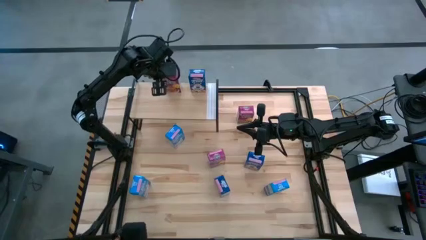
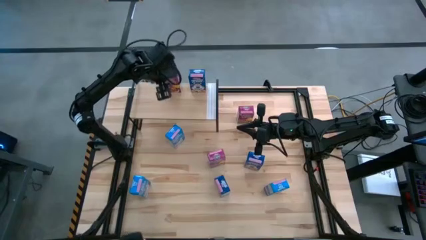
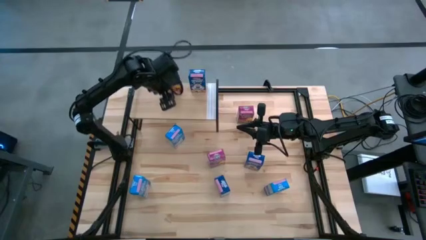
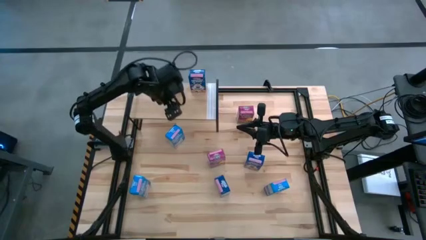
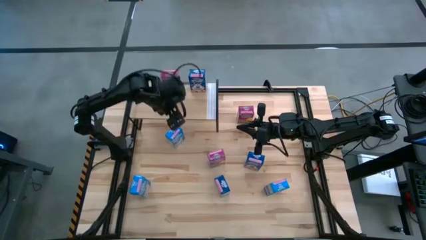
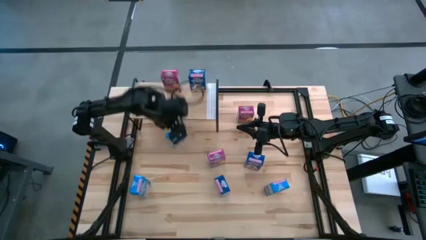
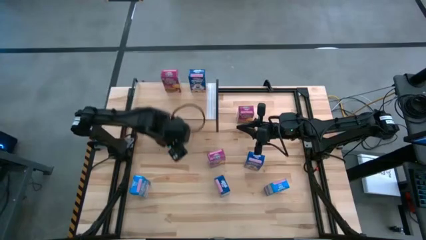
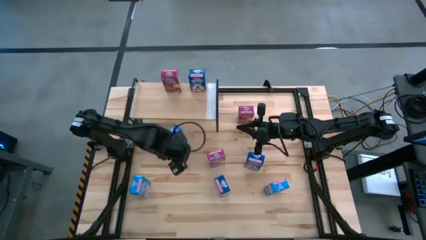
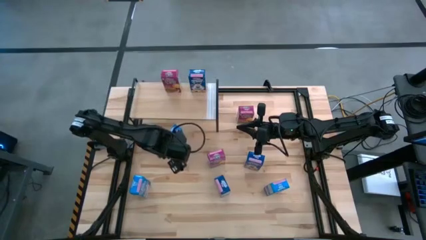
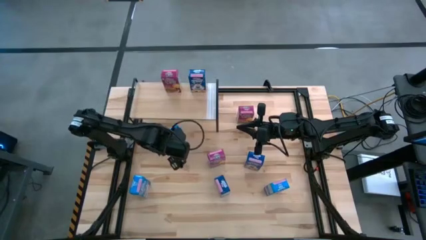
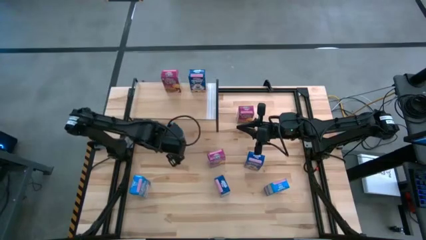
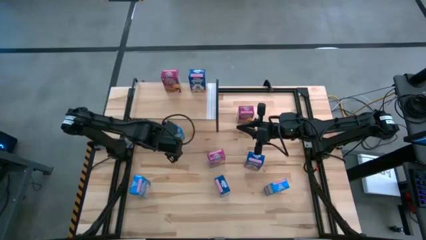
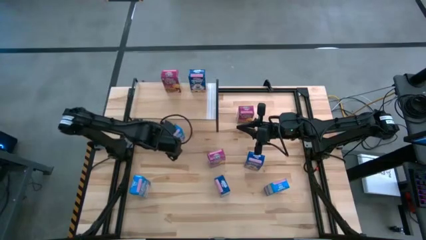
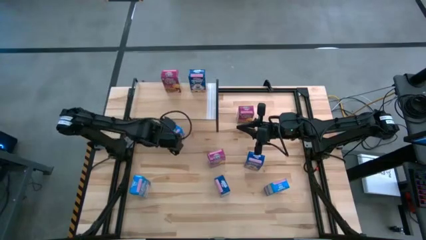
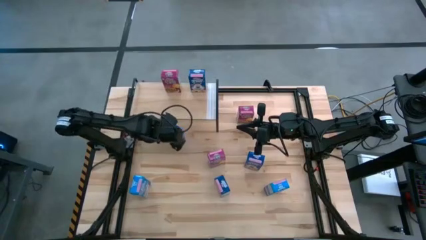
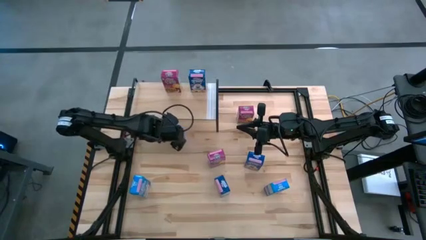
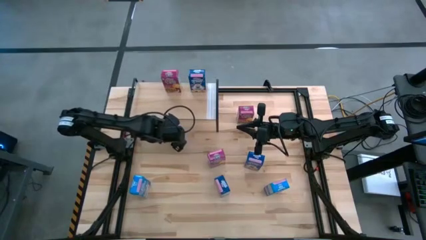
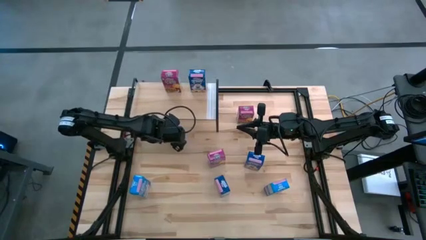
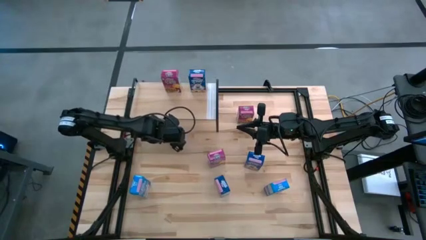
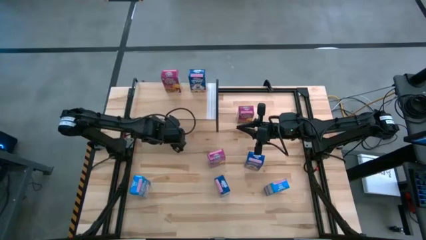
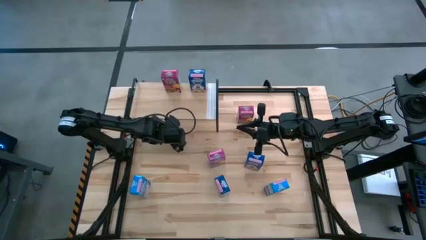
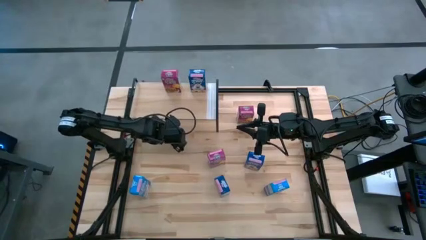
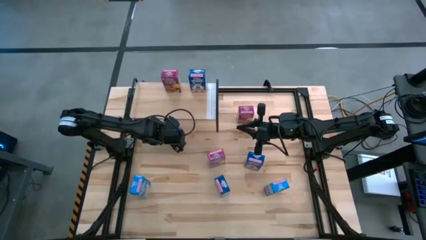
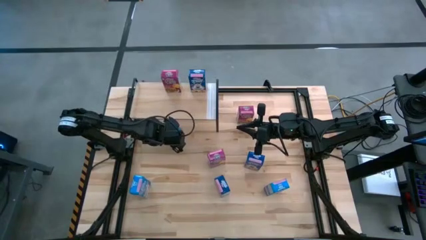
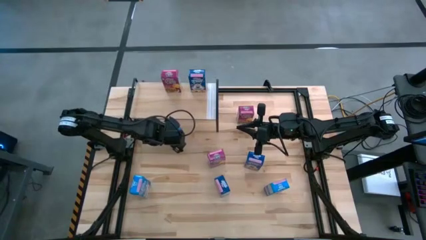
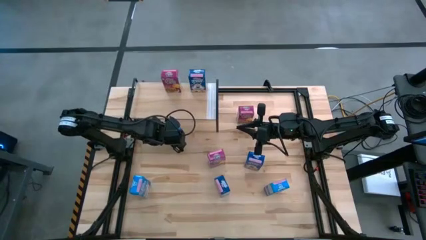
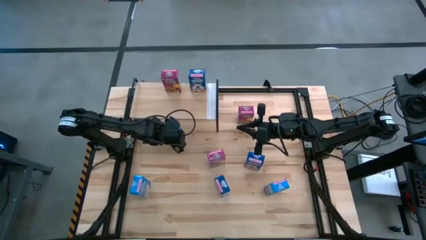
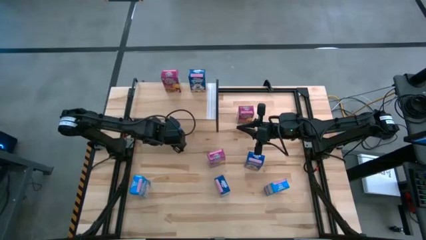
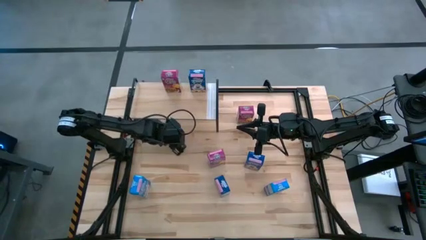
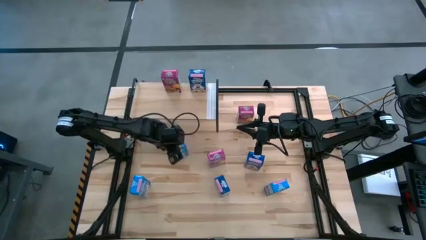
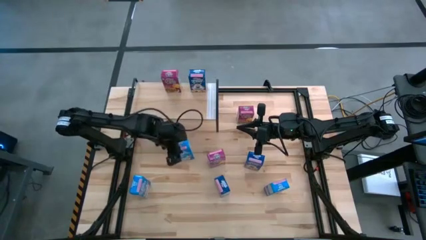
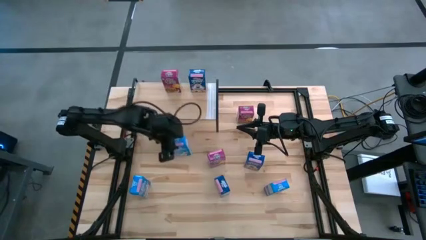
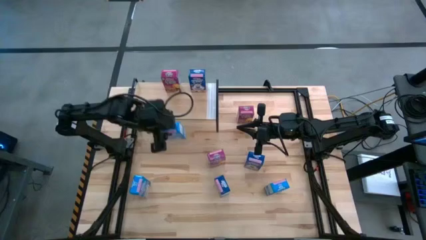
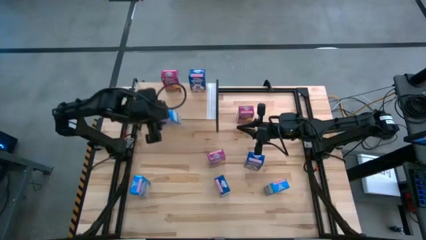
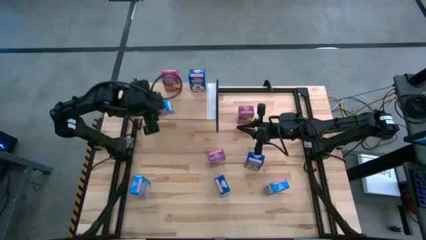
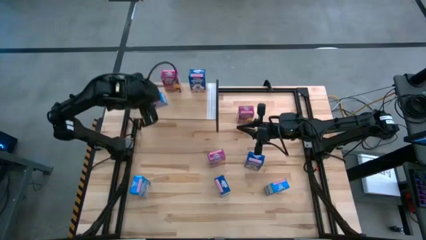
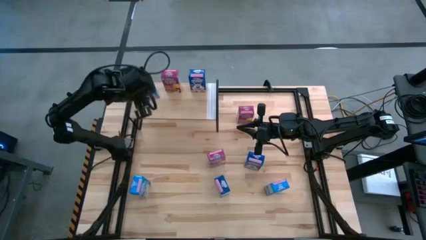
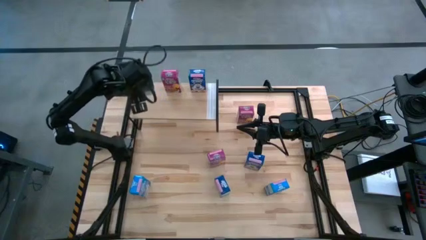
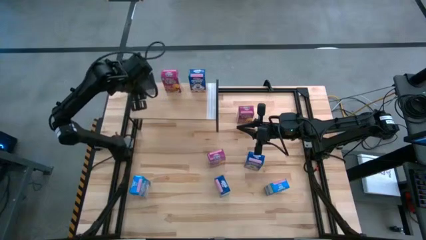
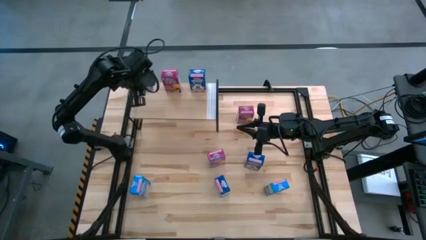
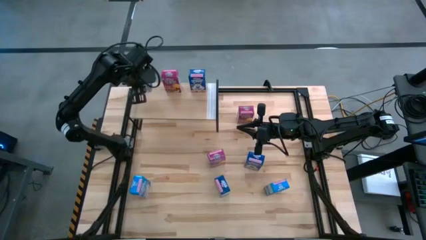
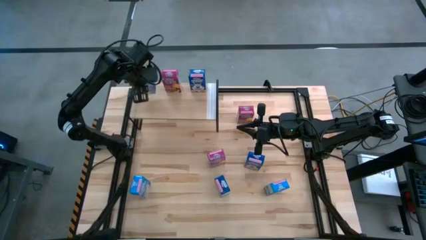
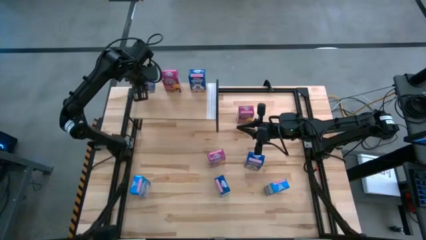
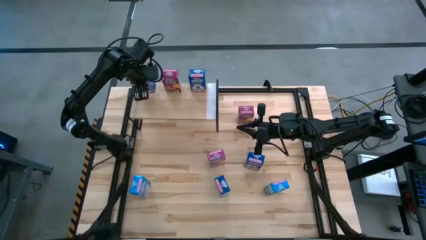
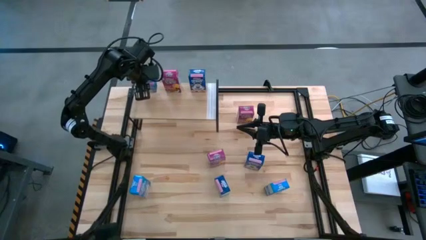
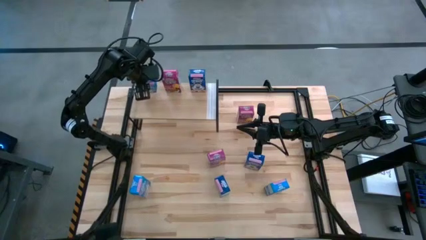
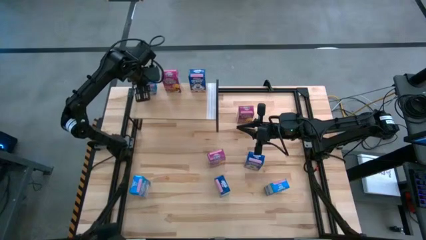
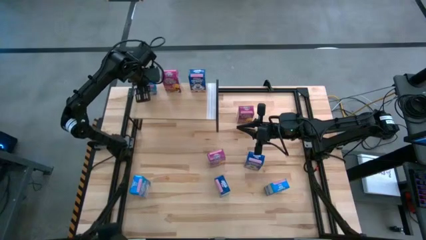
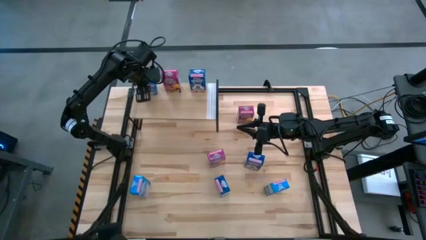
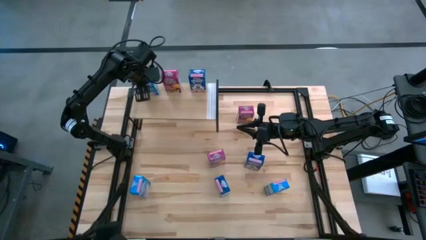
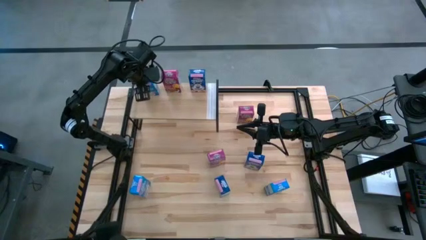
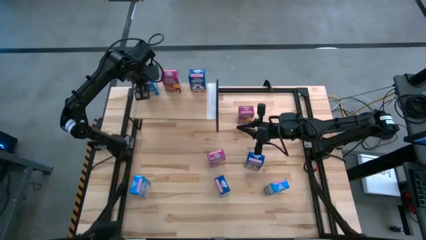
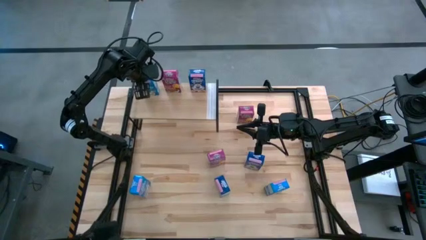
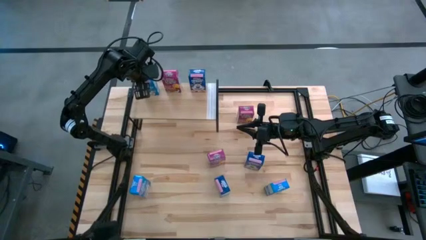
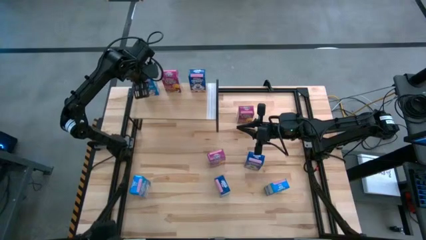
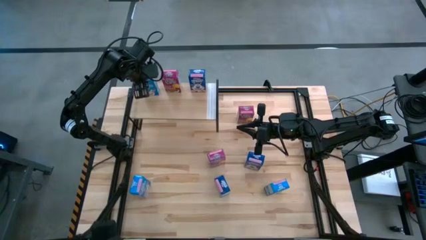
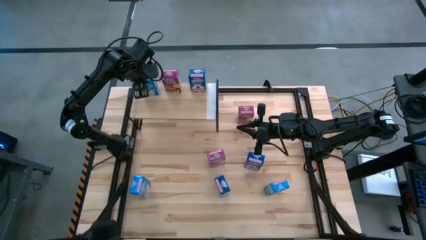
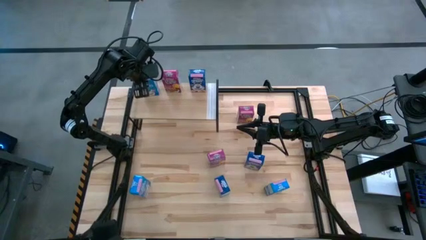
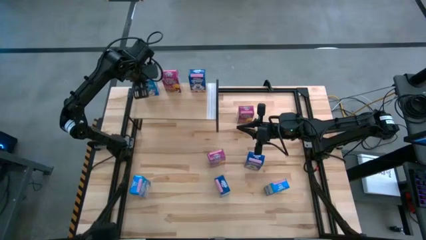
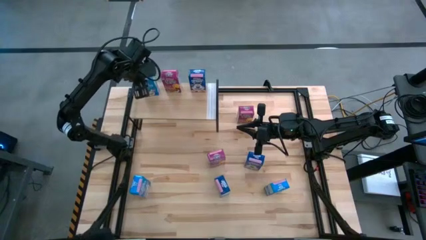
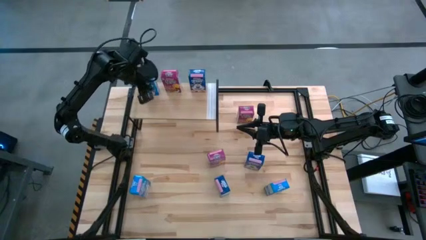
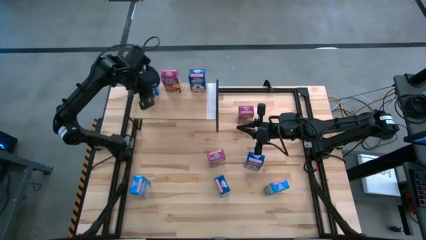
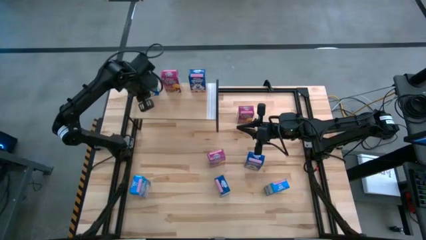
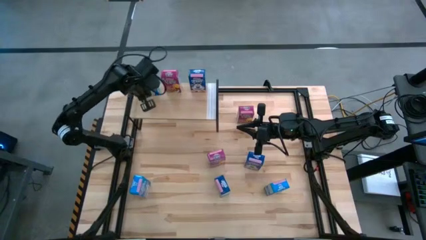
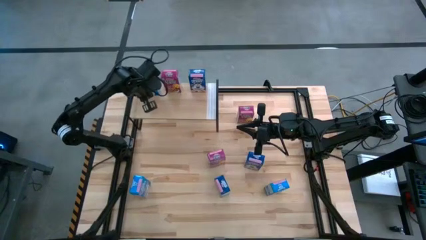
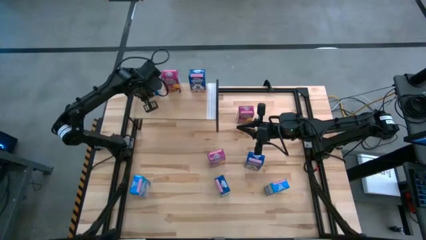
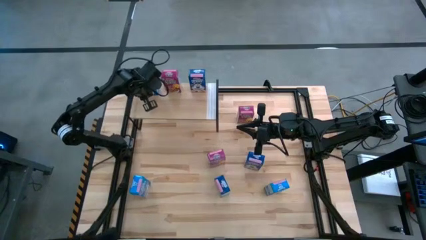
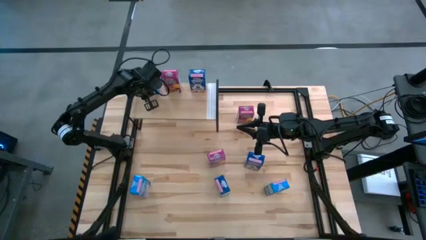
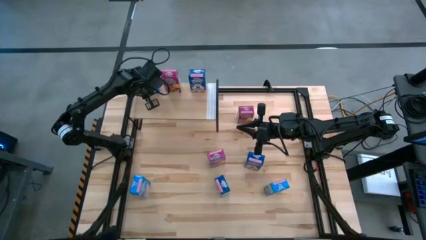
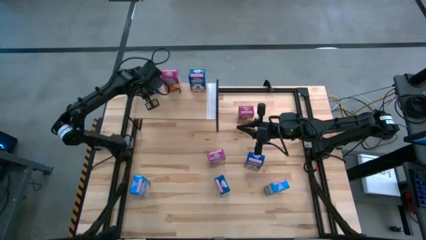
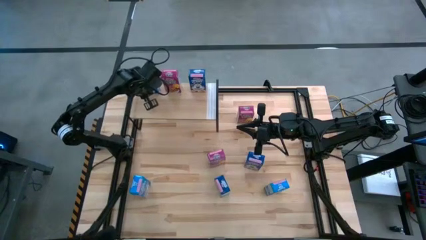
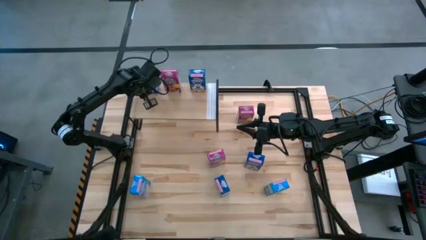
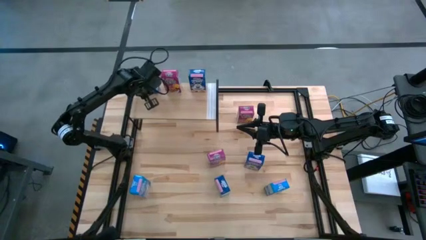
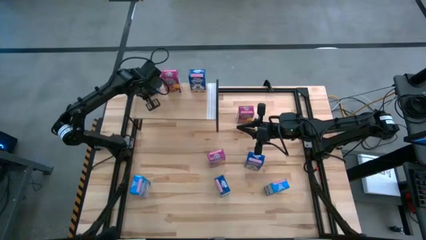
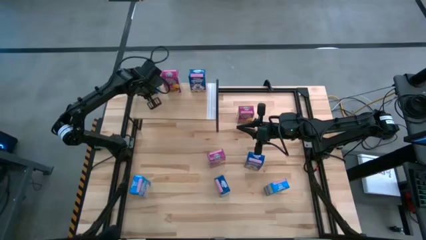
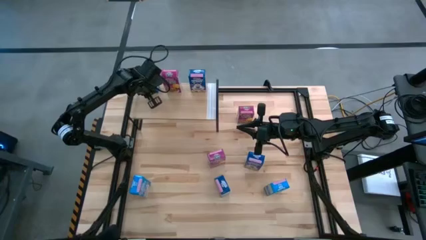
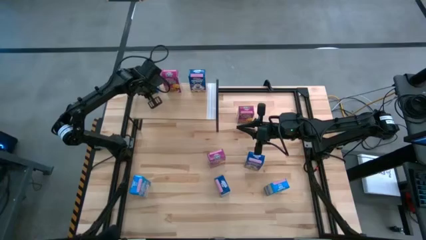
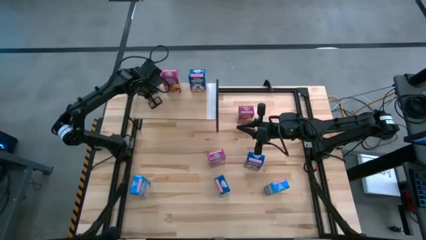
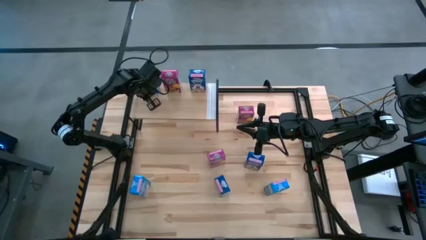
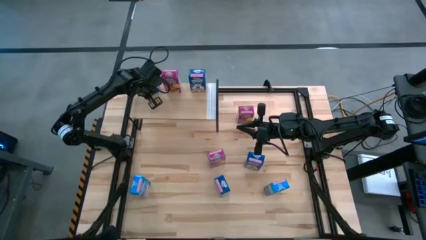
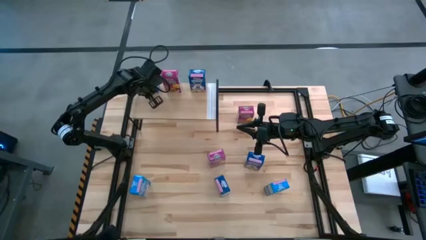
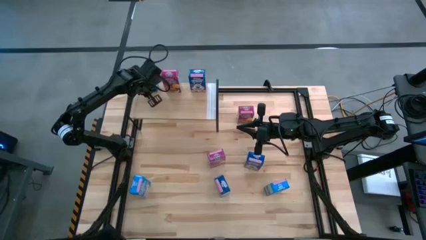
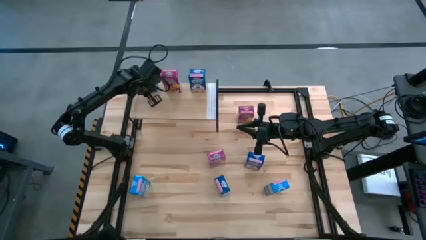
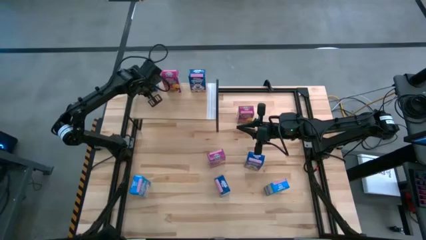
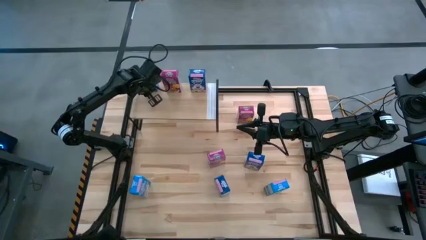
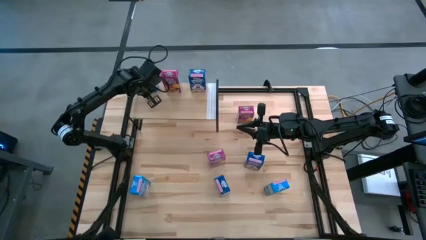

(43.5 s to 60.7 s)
Task: Stack cereal on shelf
Put the top light blue cereal box on the shelf

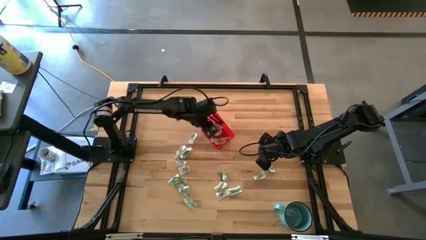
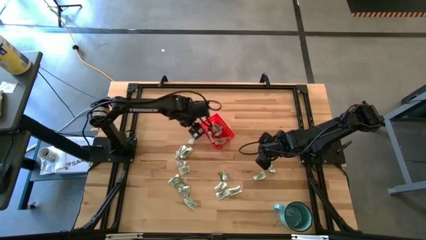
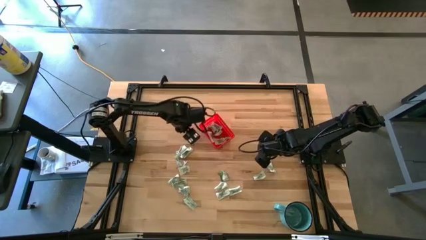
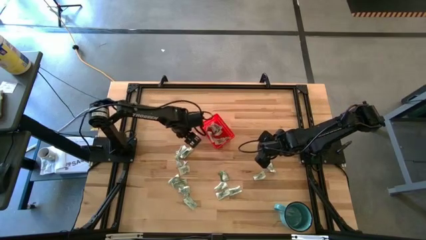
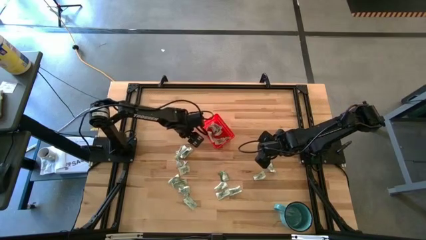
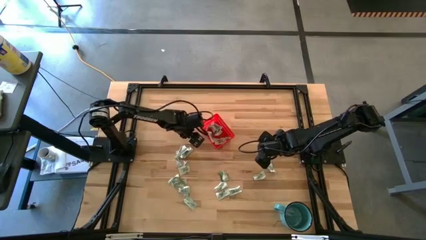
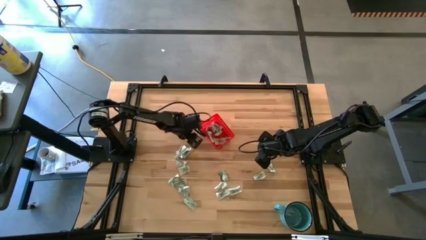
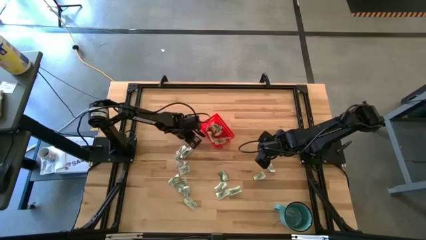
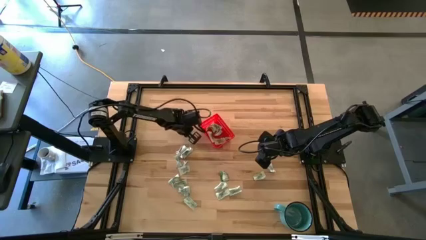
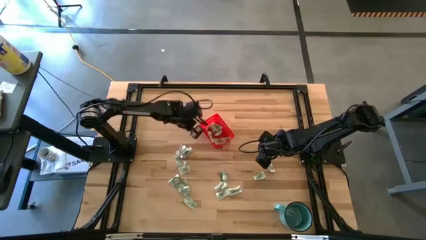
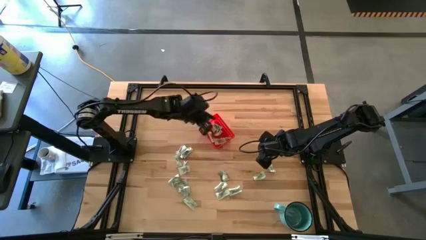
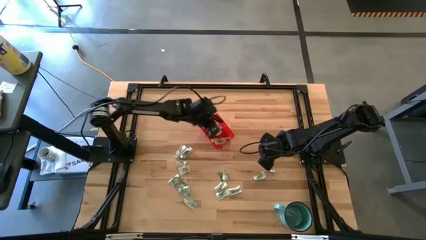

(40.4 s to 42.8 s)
Task: Pick and place Stevia / Truvia into bins
Put the stevia packet into the red basket
